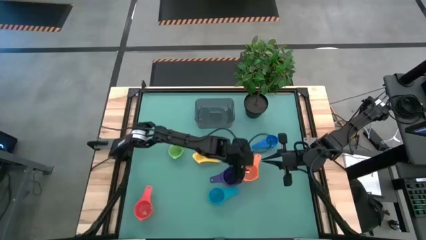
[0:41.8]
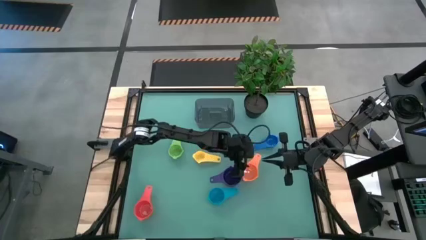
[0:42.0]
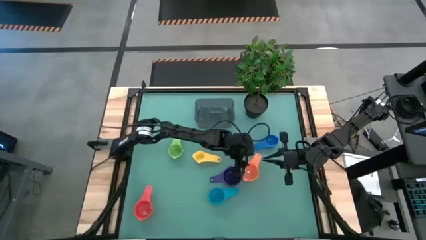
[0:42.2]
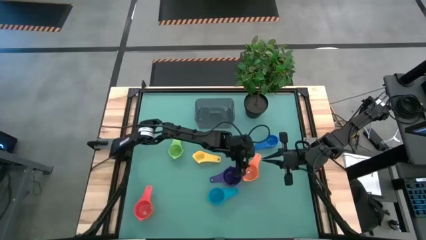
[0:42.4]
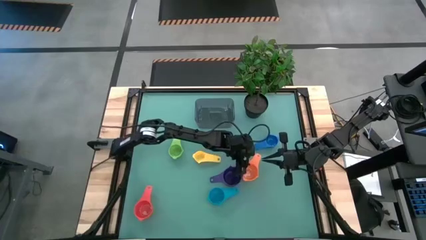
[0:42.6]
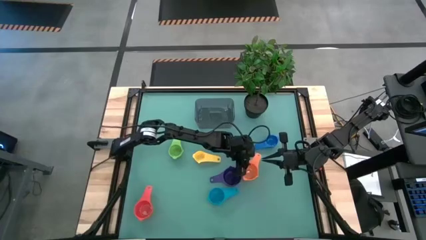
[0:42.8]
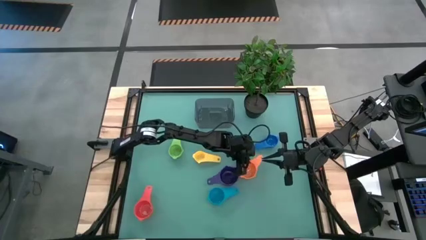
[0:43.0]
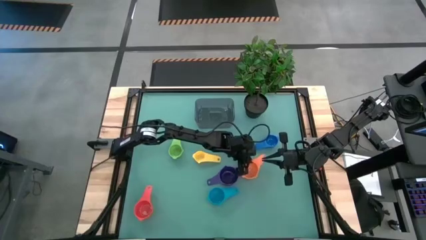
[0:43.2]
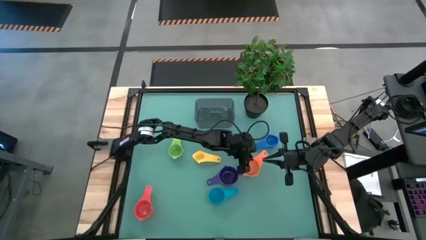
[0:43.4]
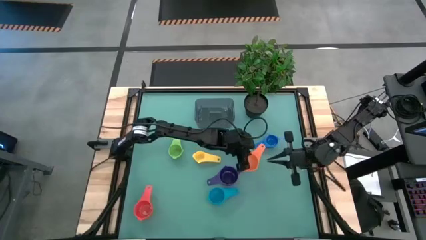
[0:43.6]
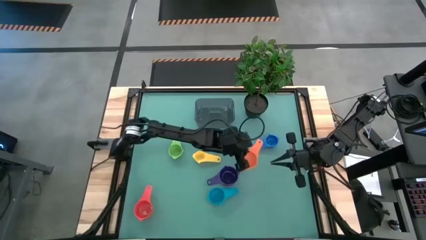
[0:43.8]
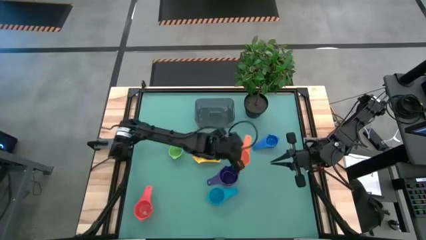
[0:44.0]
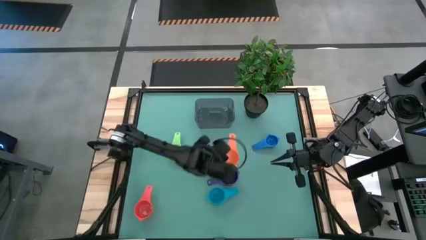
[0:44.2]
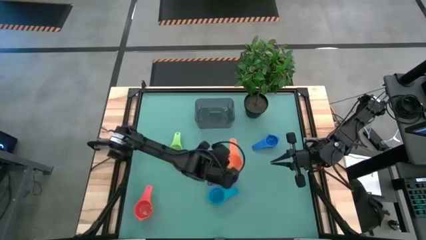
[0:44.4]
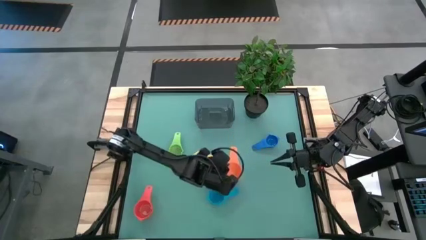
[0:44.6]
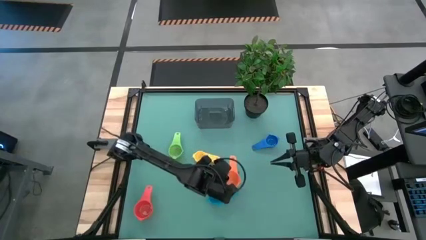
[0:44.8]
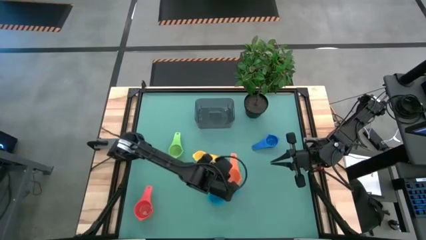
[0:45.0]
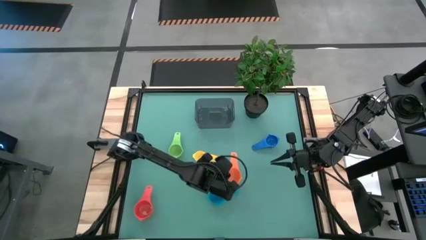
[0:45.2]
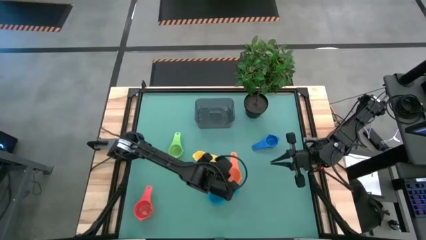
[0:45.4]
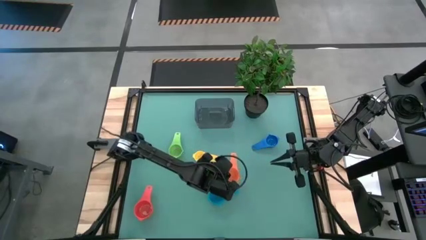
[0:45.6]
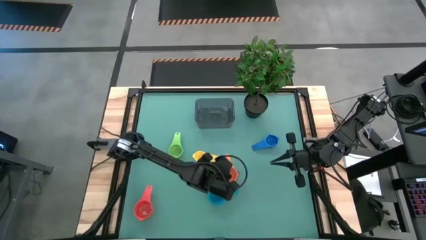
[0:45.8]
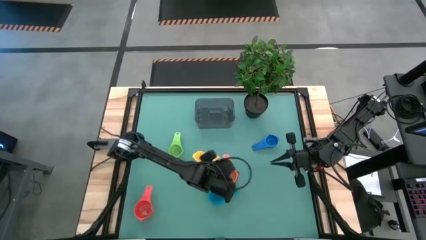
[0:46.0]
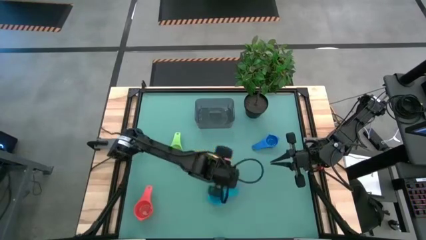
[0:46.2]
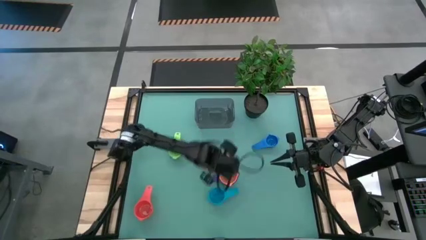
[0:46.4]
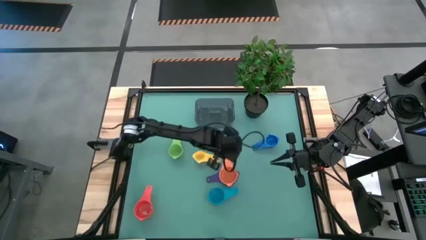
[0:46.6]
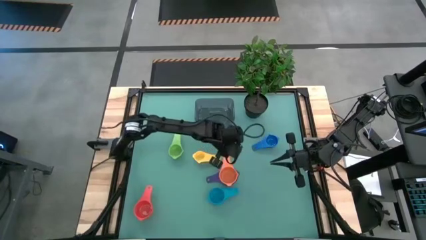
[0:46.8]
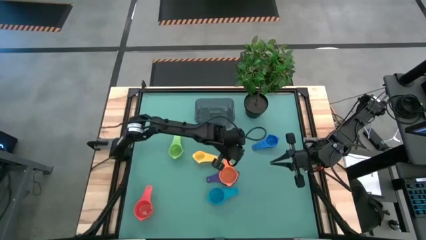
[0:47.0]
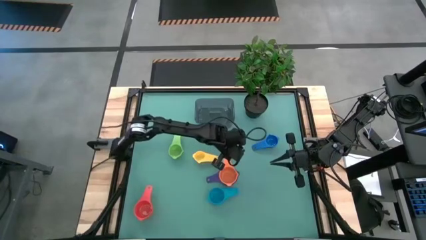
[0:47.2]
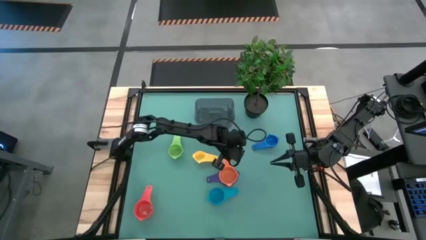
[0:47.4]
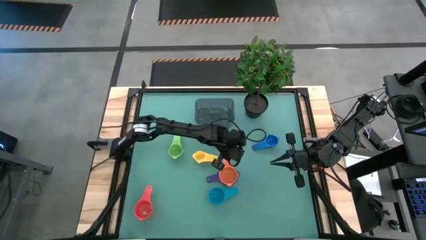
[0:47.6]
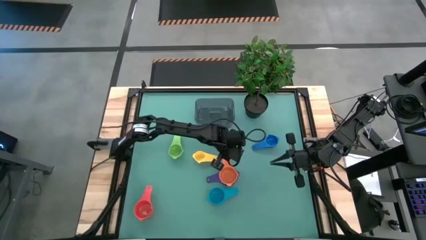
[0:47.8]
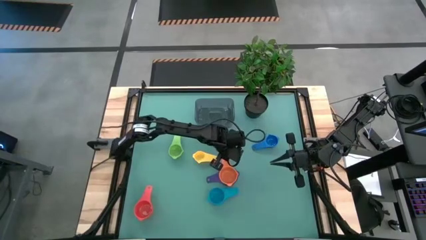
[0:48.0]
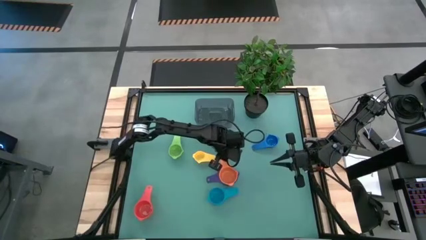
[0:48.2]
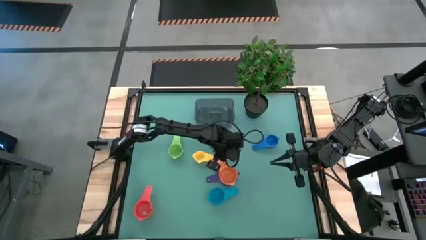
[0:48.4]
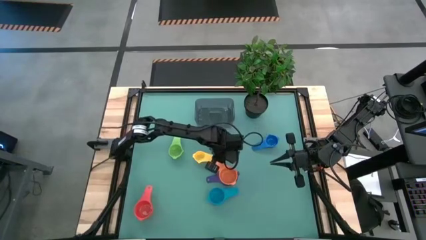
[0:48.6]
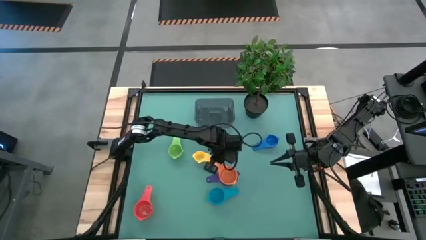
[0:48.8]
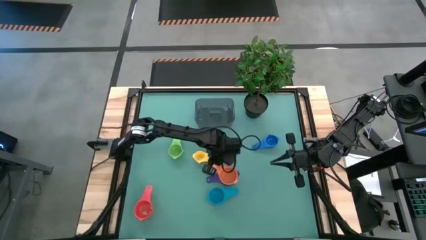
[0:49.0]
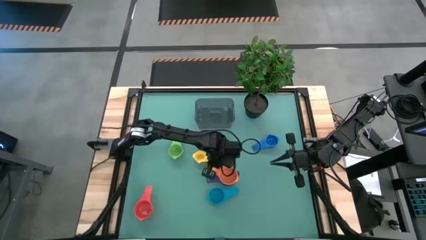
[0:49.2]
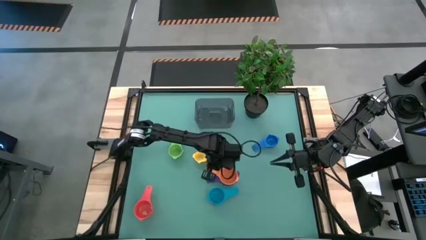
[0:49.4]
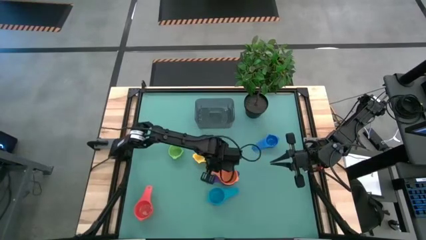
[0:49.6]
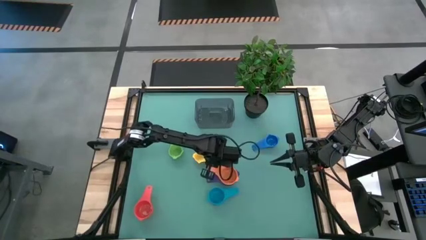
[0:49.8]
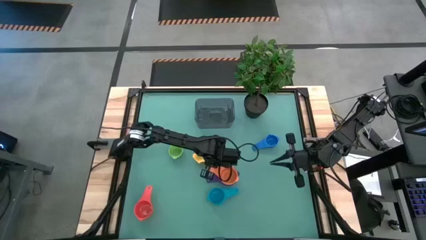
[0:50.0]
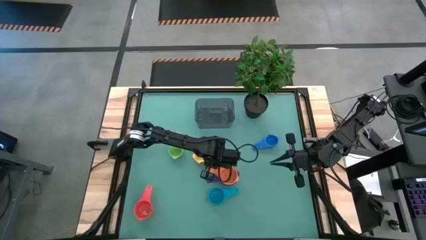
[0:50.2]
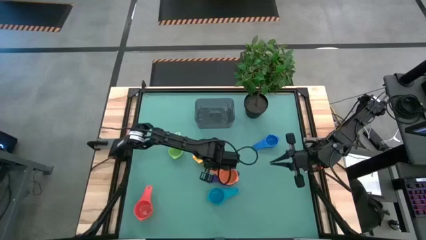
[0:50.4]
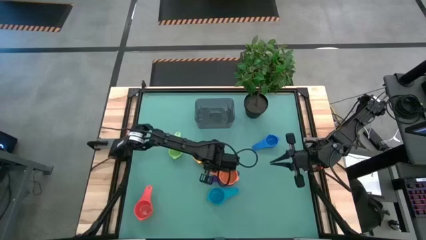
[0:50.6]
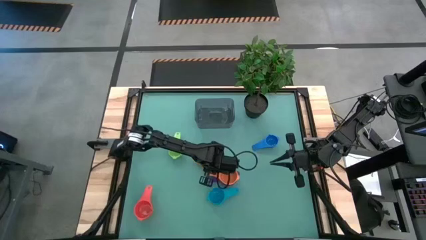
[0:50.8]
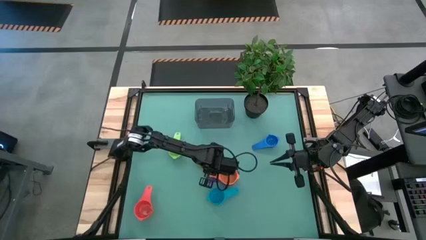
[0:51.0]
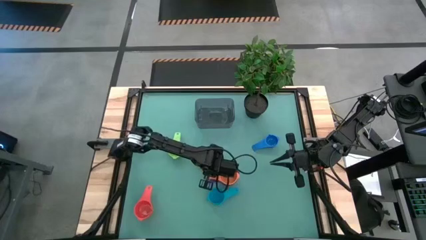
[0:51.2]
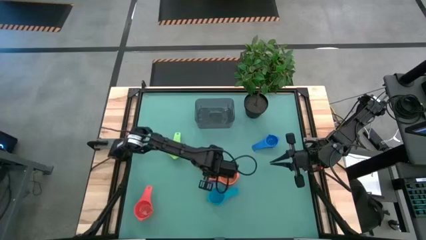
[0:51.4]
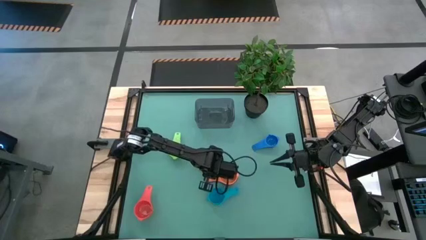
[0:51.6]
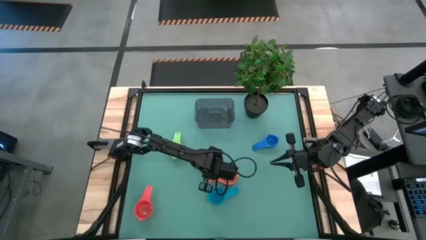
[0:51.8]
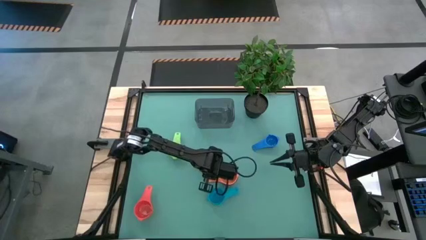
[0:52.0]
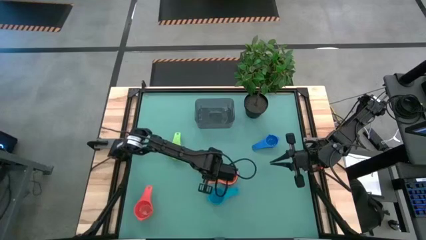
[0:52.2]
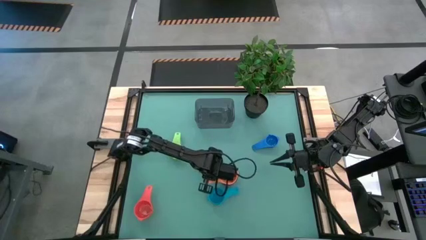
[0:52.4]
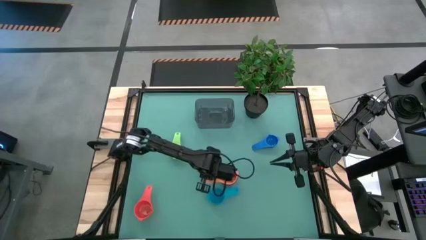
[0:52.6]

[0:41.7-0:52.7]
Task: Nest measuring cups in basket
Stack the orange measuring cup into the purple measuring cup

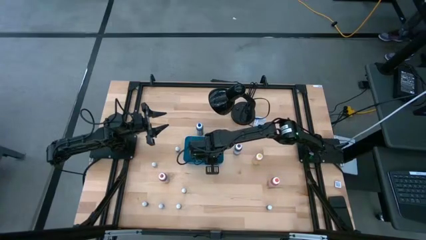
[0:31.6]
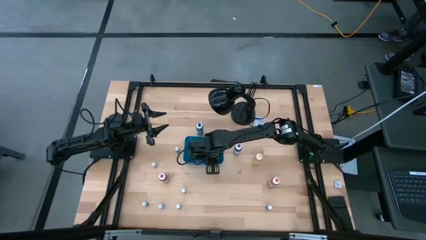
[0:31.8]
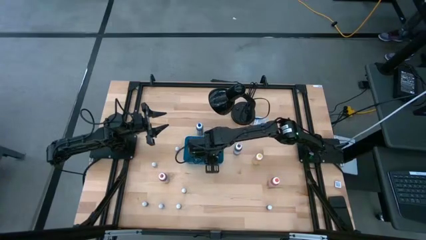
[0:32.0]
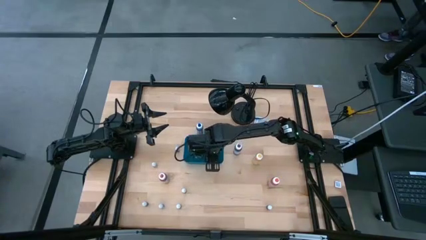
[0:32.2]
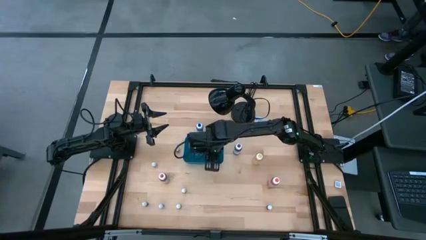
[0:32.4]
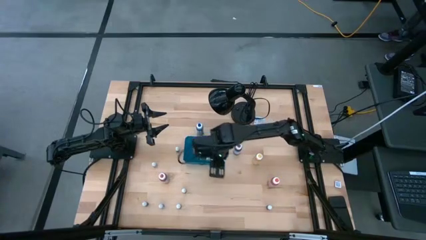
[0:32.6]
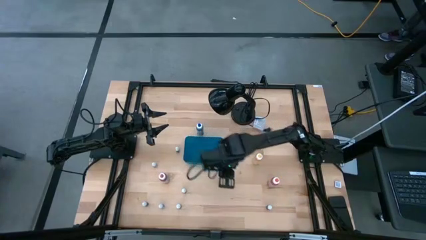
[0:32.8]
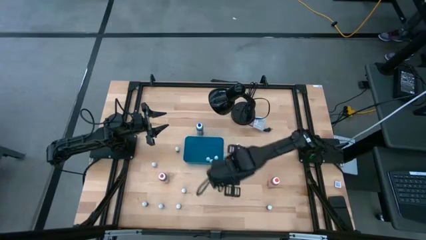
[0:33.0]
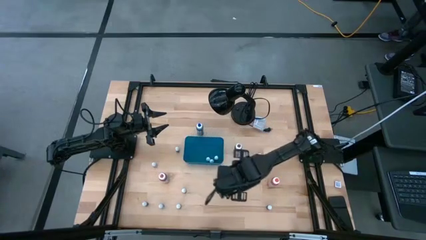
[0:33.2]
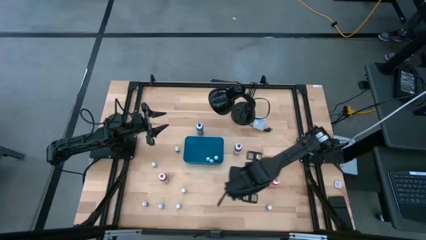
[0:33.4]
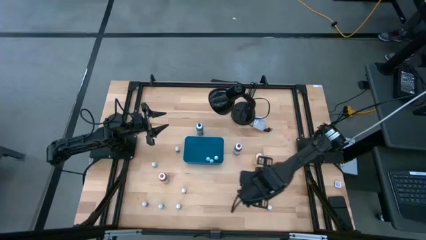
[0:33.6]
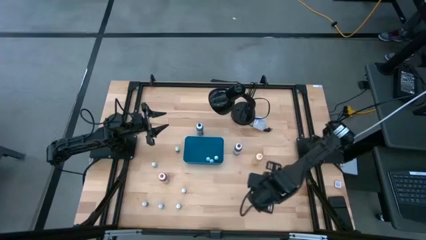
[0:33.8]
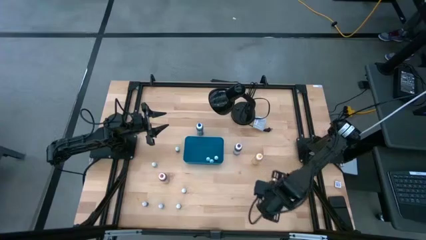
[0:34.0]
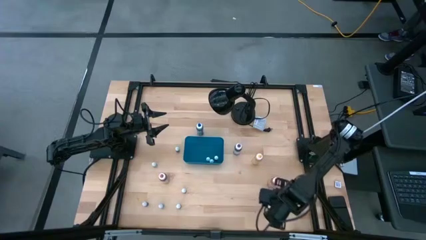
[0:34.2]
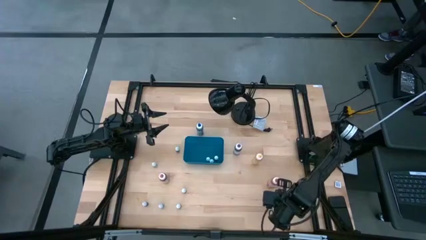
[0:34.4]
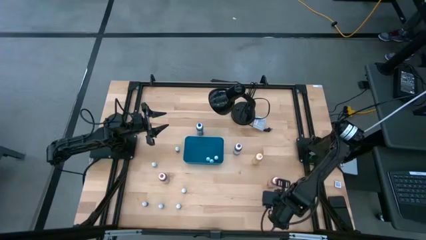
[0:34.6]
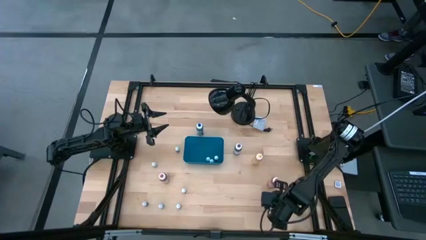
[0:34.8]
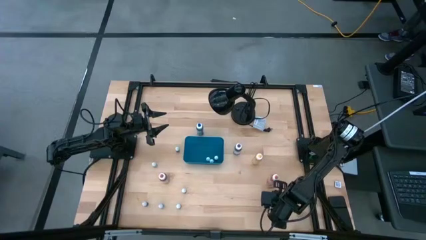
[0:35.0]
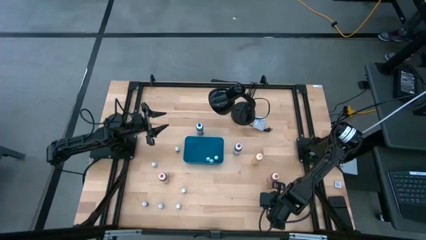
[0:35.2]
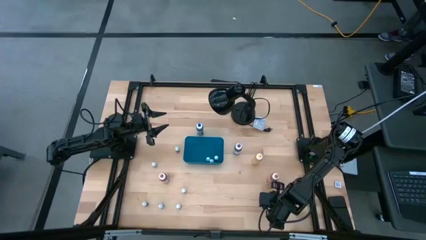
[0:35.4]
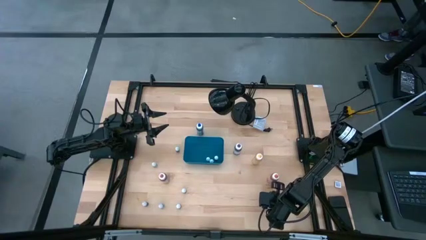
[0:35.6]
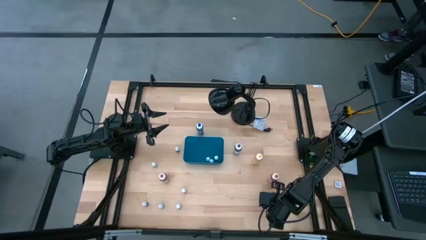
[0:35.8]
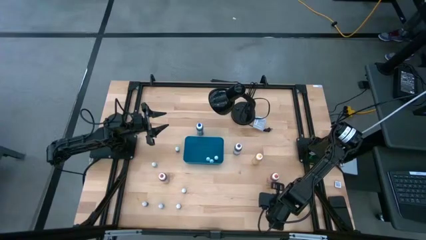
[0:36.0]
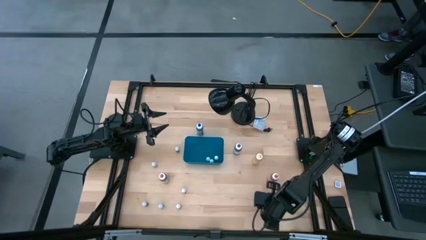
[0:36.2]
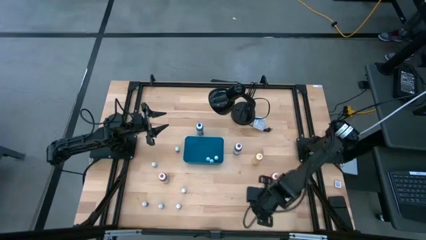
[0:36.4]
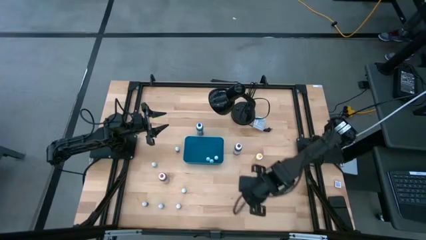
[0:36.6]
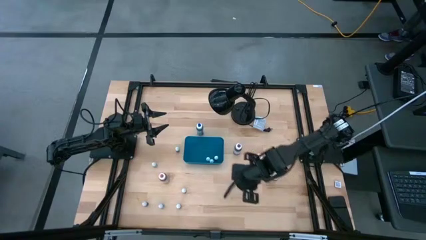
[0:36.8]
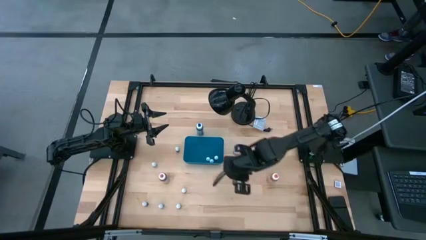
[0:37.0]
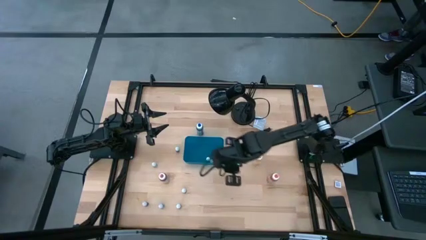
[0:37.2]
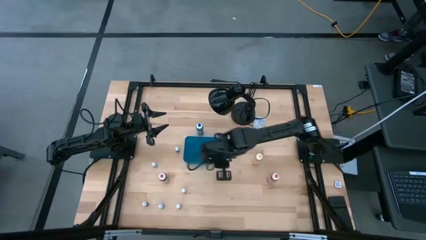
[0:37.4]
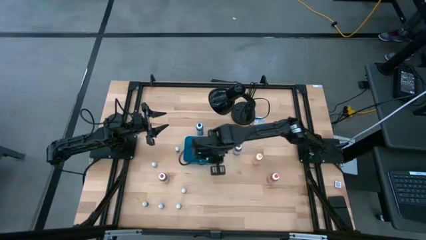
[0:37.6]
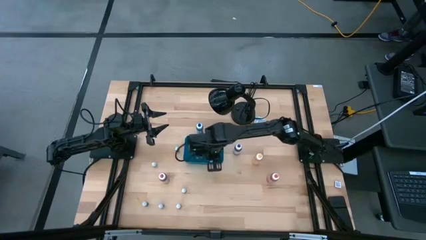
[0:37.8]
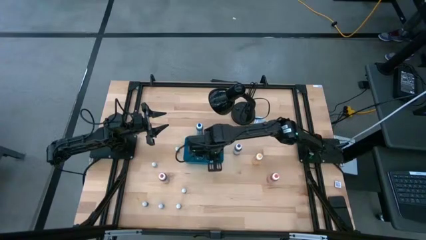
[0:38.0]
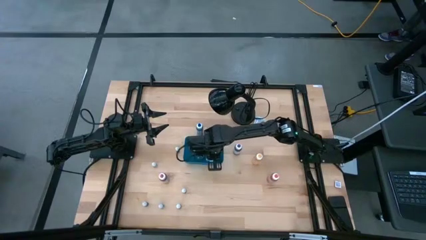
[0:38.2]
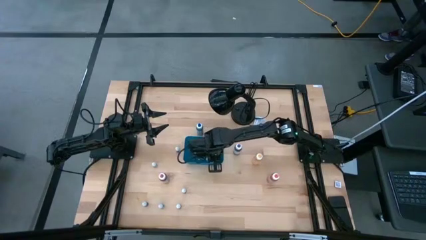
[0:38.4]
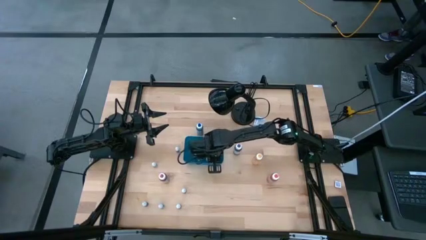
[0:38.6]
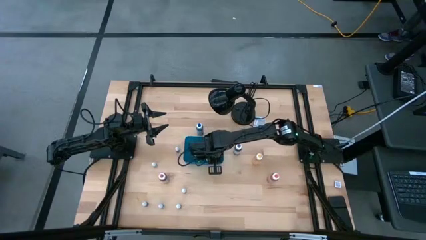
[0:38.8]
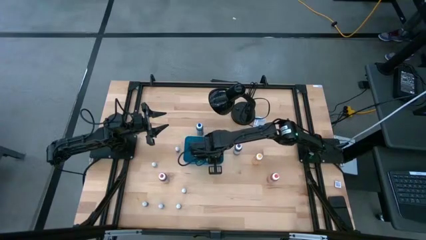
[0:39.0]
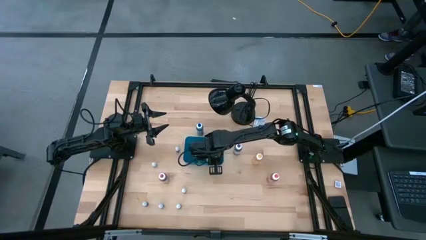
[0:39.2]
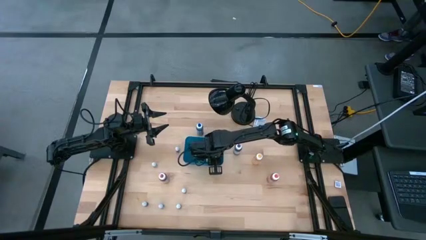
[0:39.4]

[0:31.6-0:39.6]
Task: Pick & Place food coloring
Put the small dark red food coloring bottle into the blue bin
